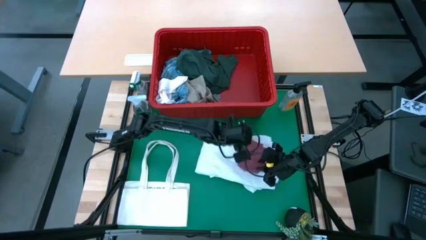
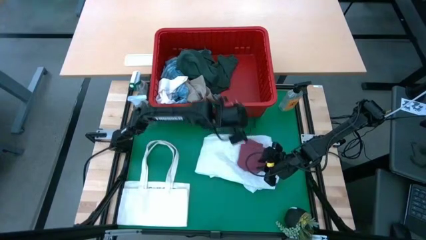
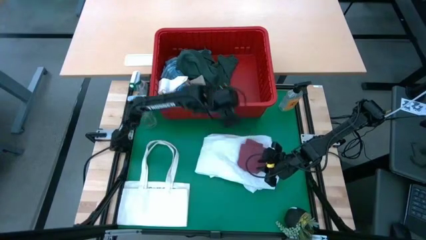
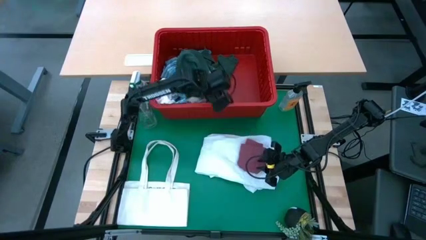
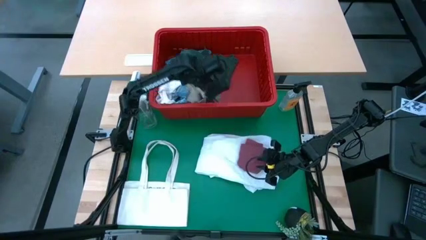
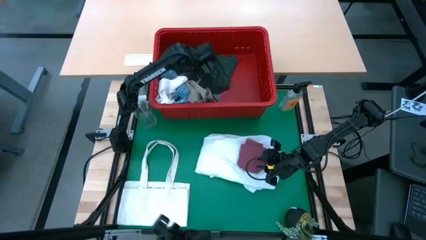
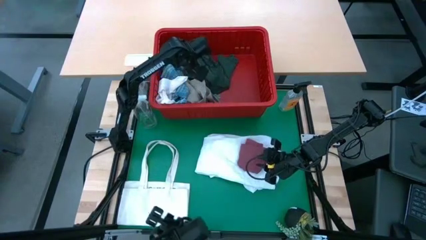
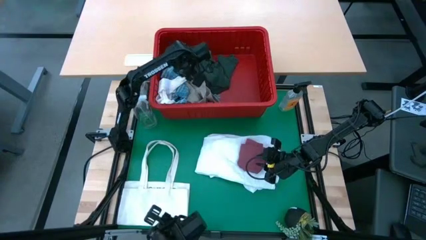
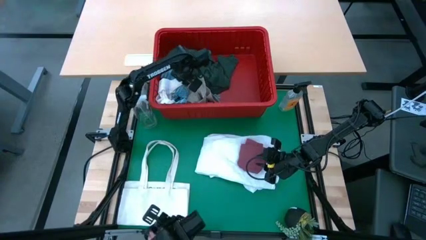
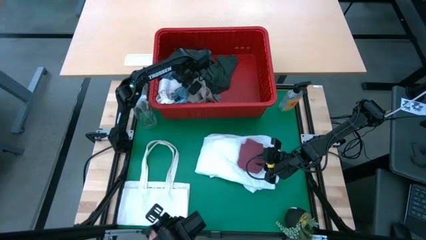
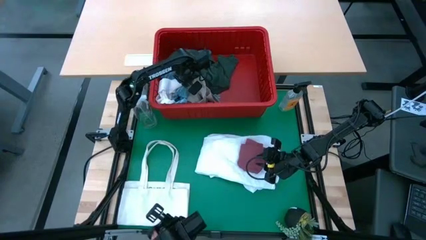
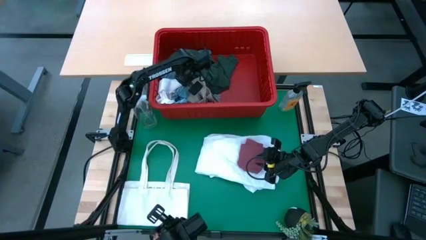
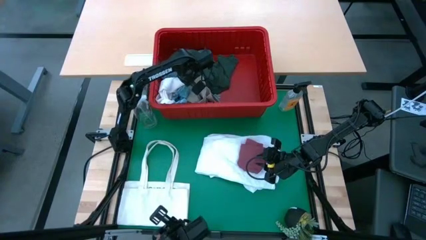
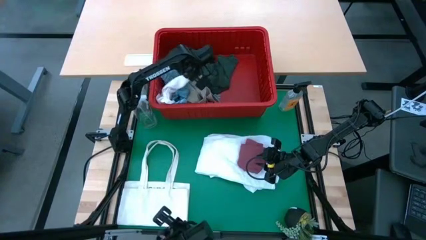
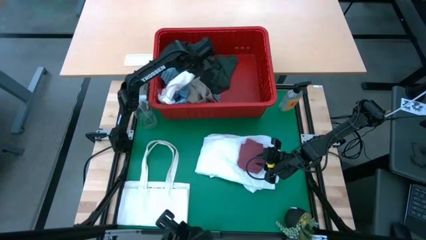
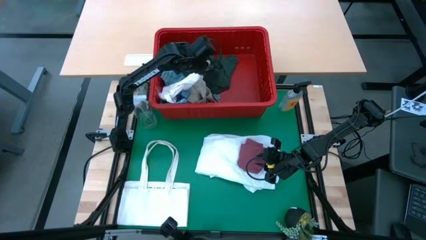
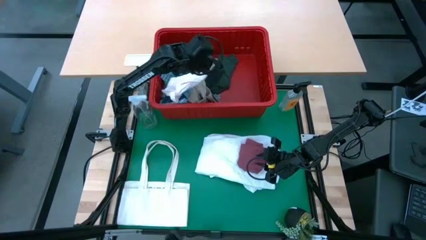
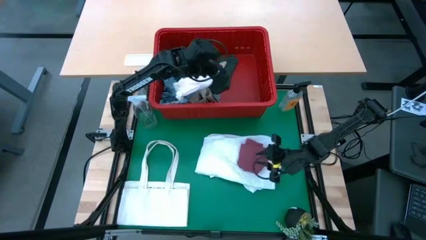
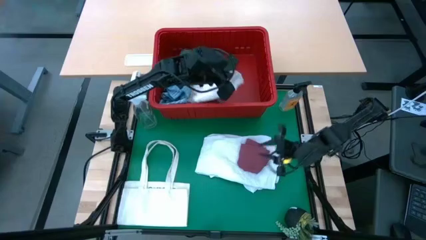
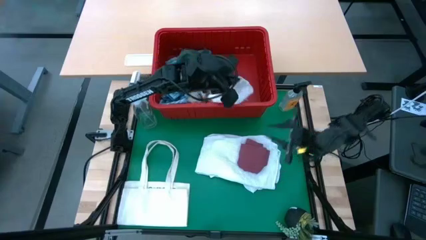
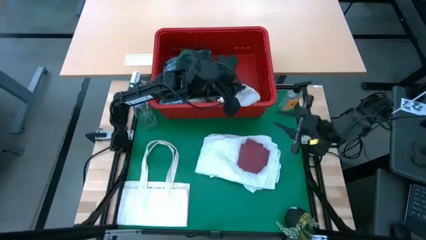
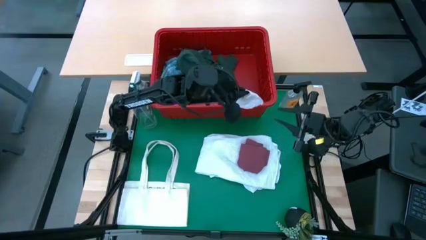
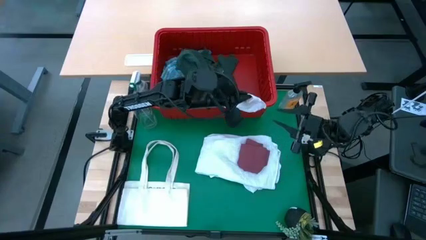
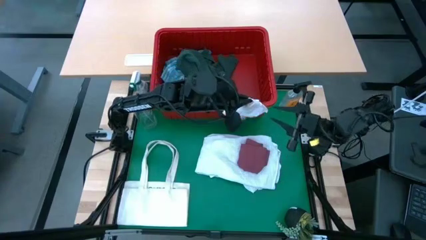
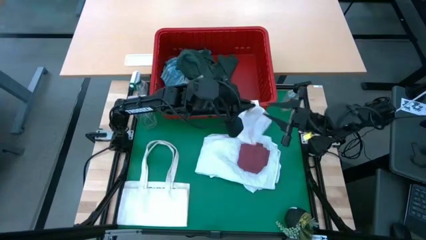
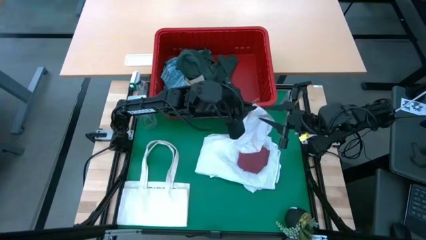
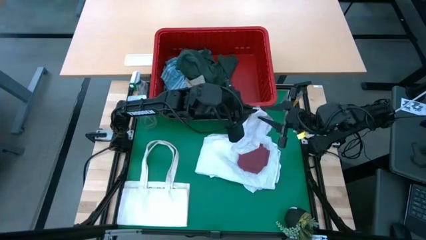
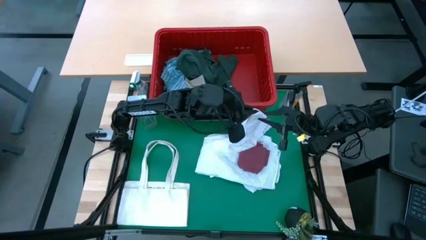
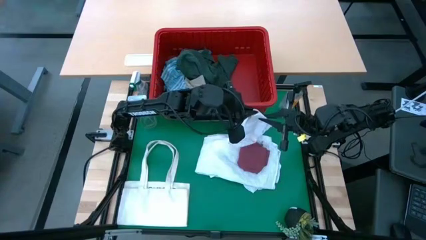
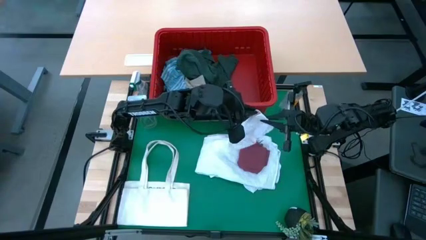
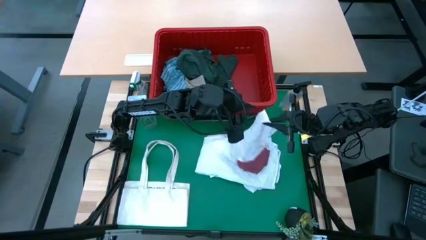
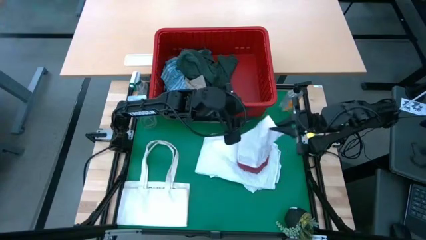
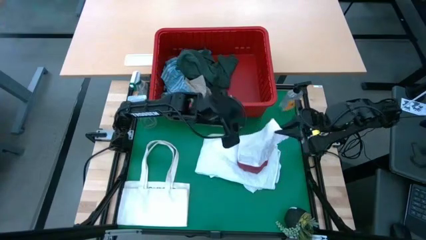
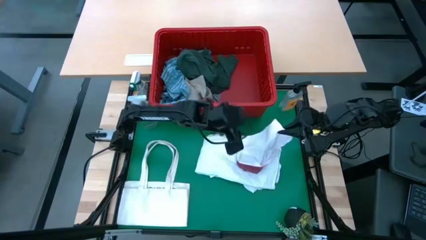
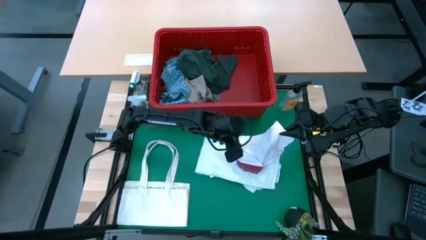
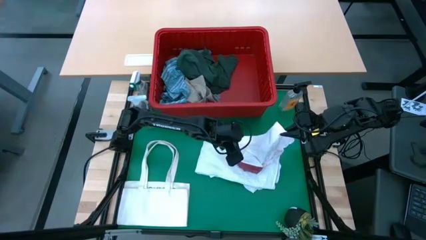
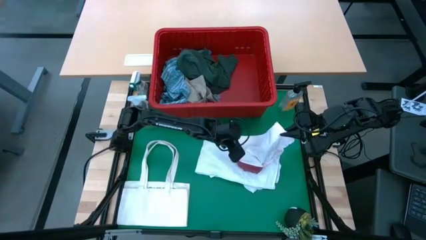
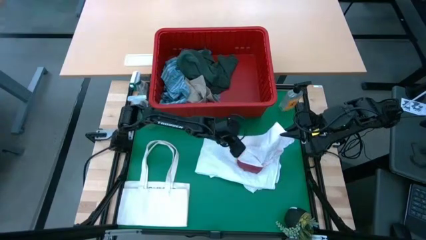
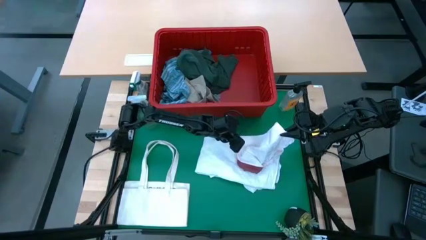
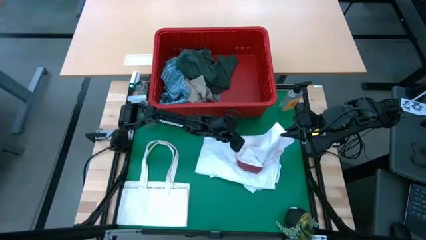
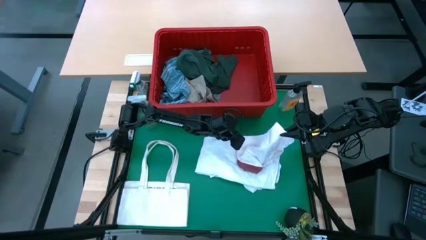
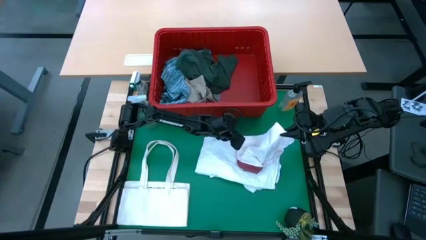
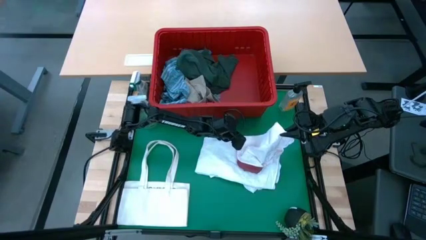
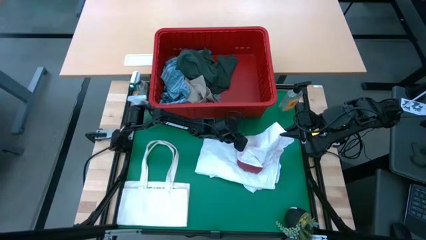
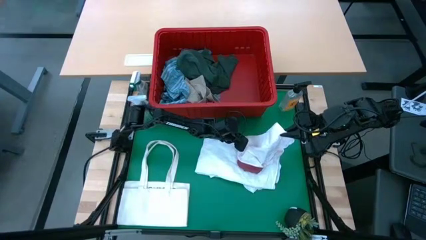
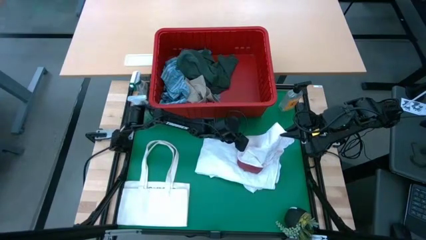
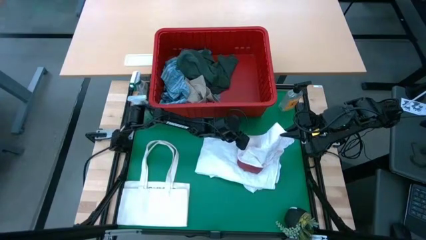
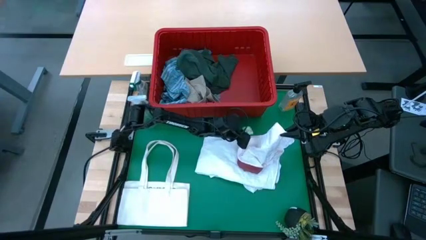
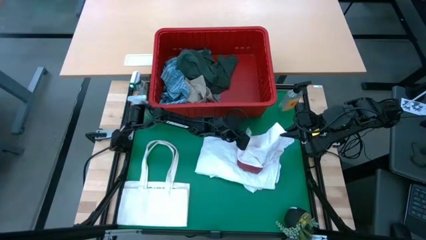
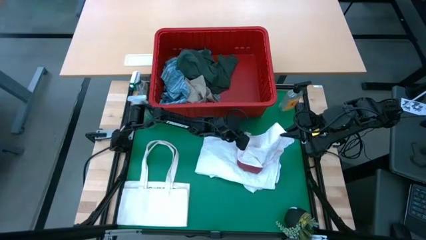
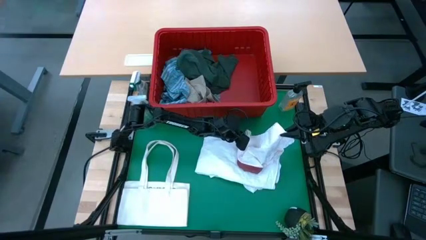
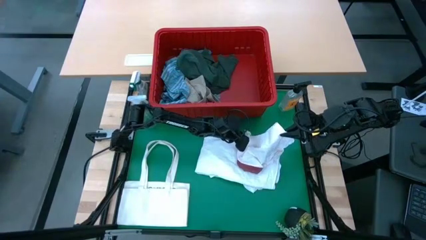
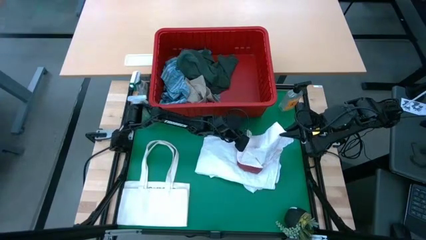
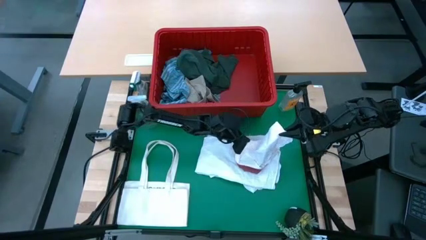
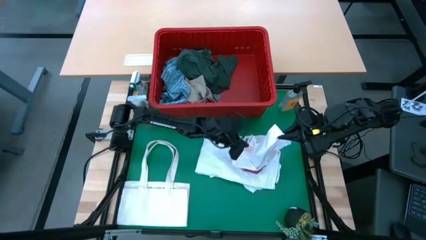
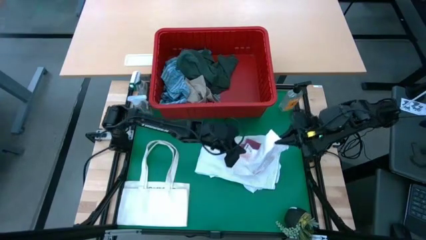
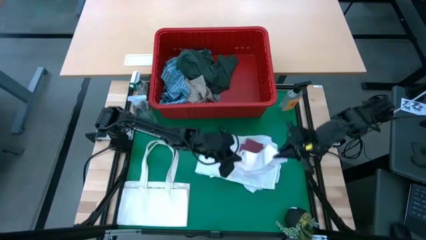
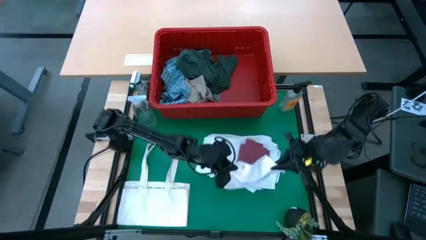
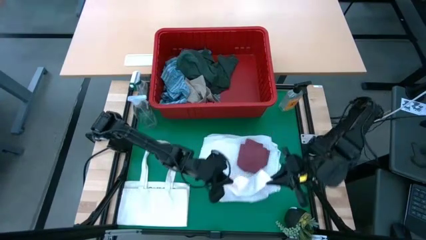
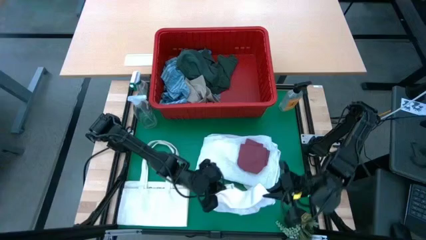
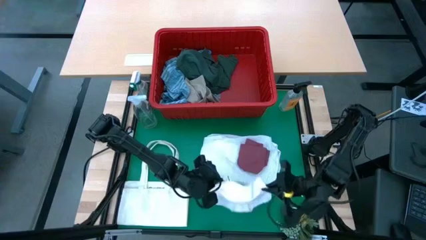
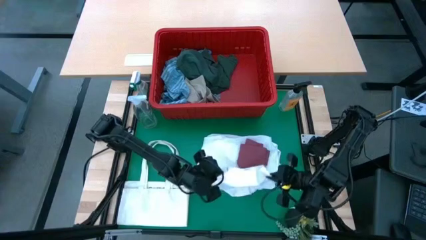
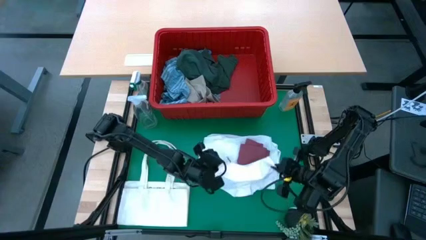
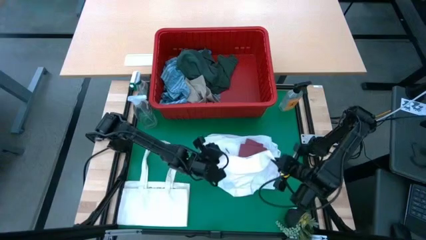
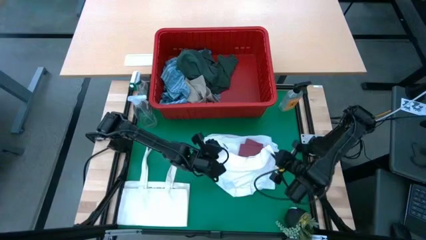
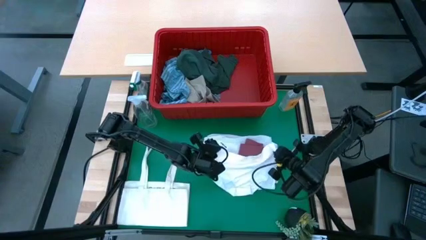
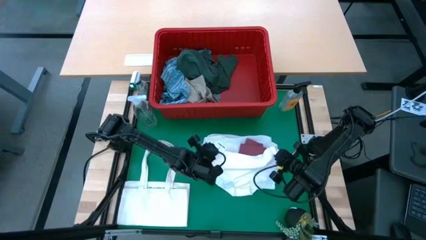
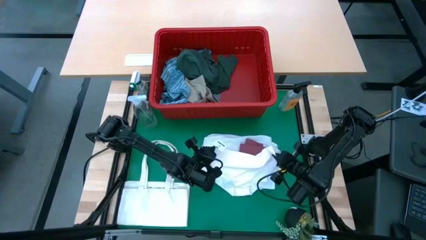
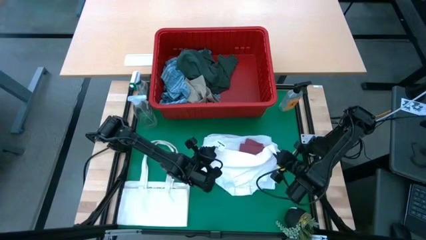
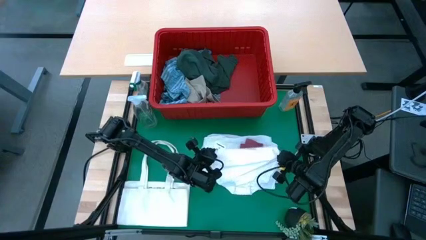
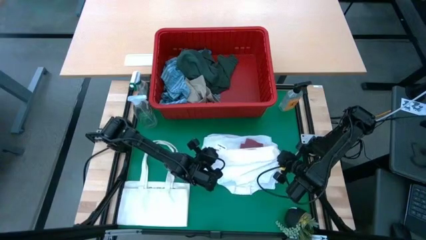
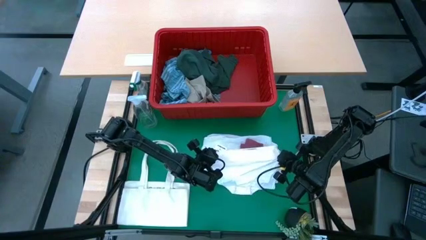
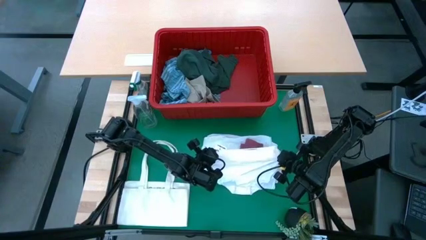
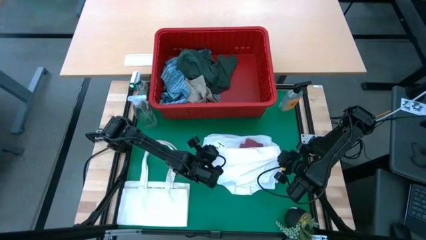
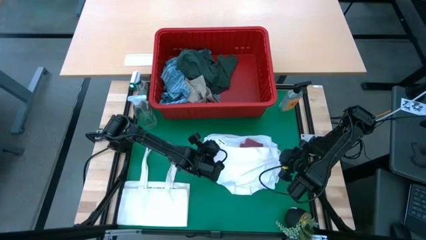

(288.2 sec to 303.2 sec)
Task: Fold Laundry from Bin
Fold the white underwear
